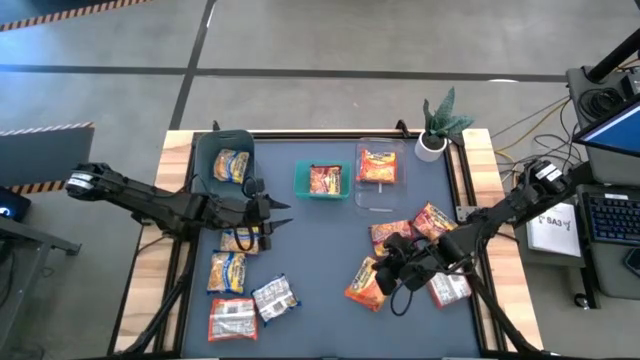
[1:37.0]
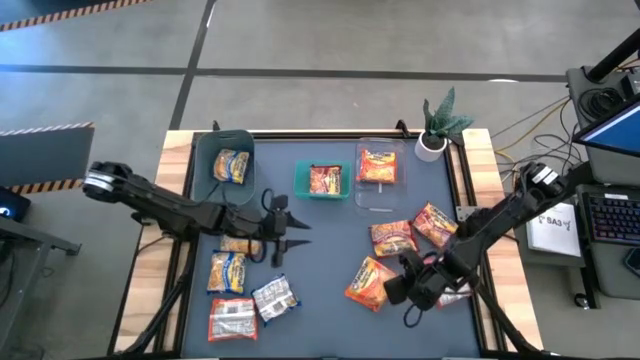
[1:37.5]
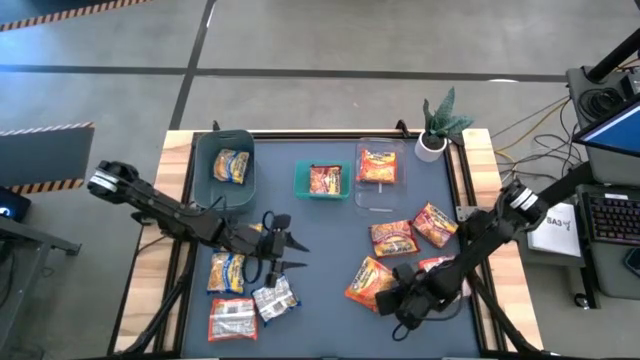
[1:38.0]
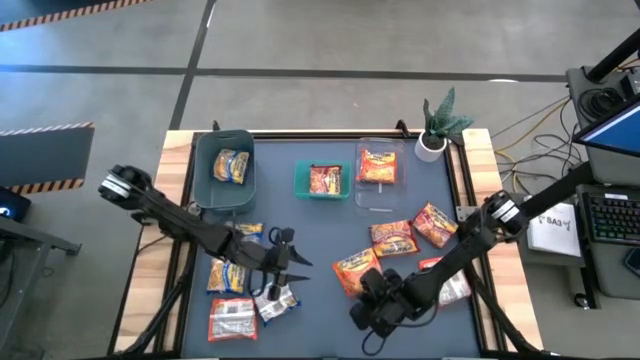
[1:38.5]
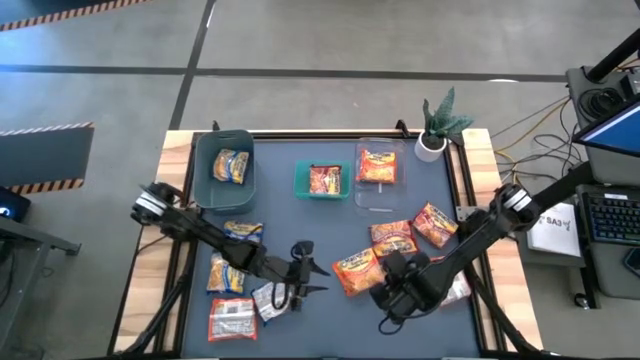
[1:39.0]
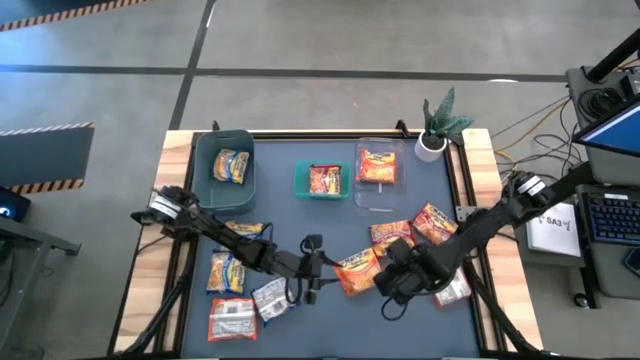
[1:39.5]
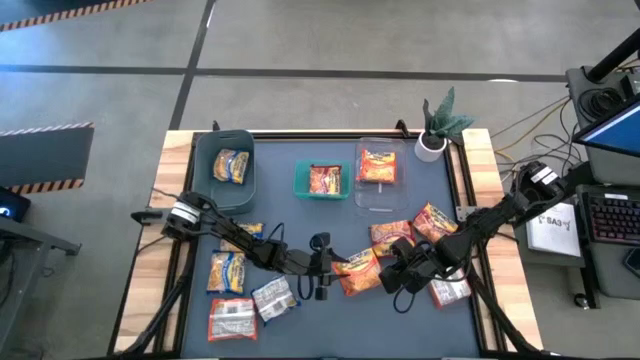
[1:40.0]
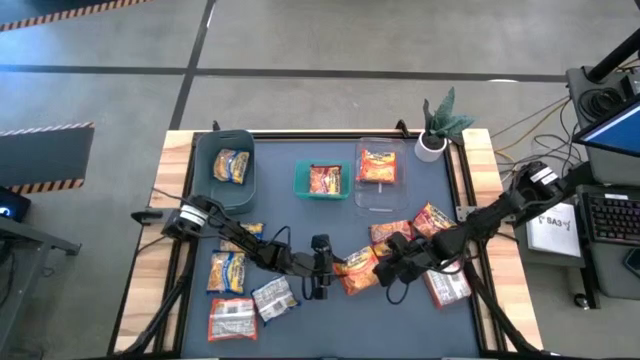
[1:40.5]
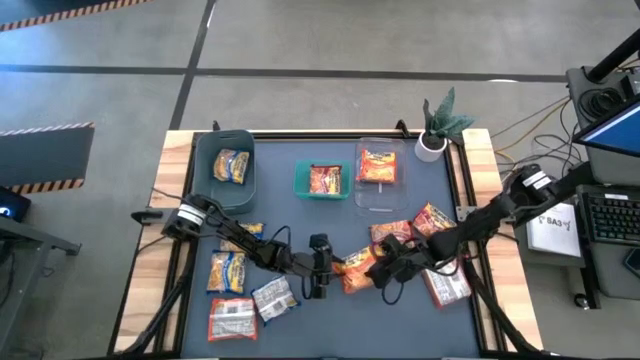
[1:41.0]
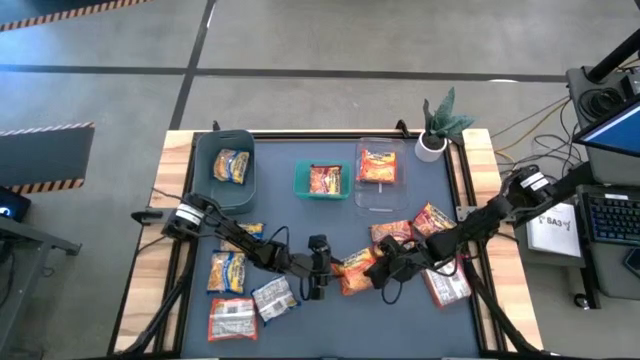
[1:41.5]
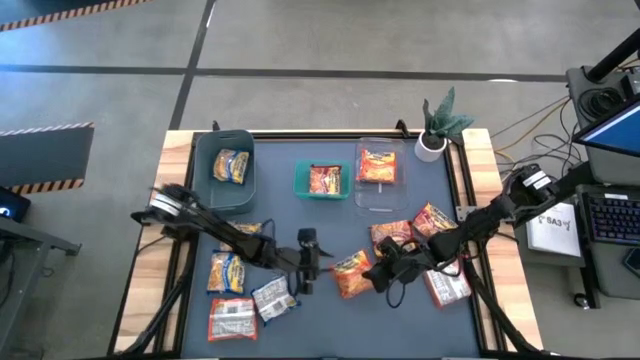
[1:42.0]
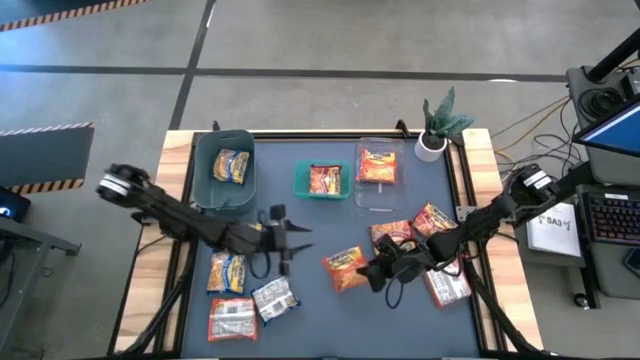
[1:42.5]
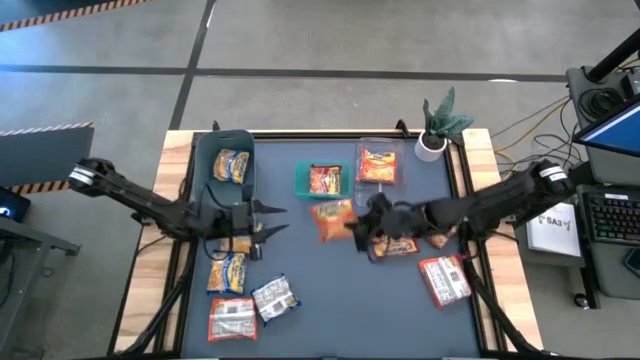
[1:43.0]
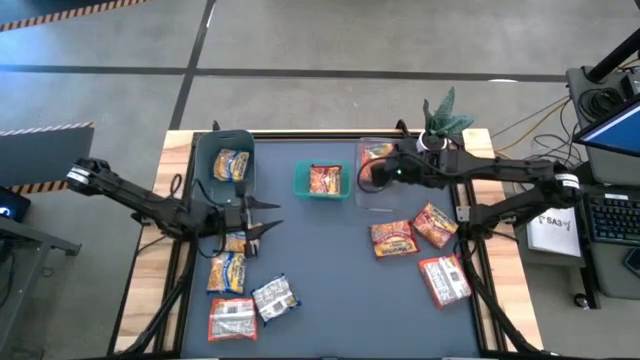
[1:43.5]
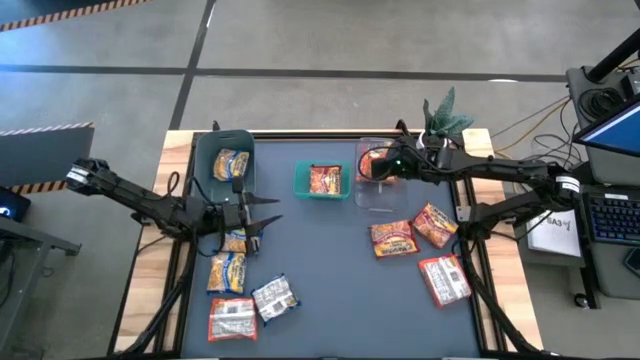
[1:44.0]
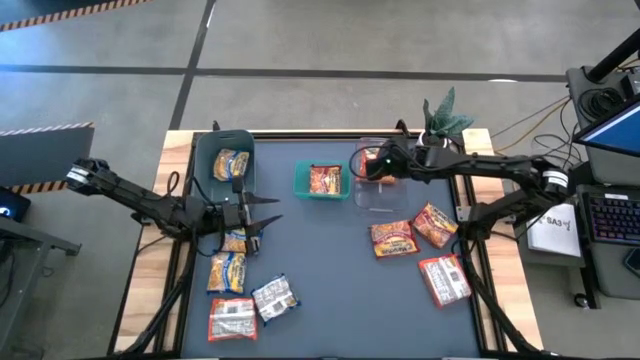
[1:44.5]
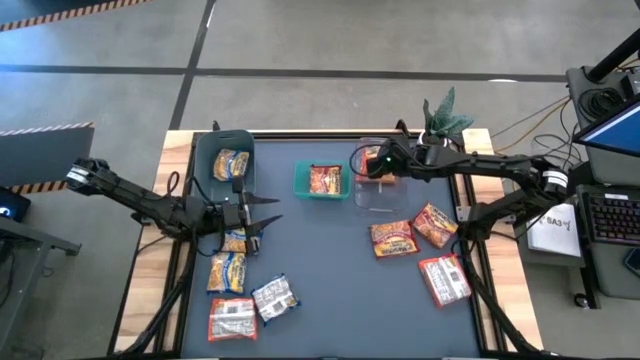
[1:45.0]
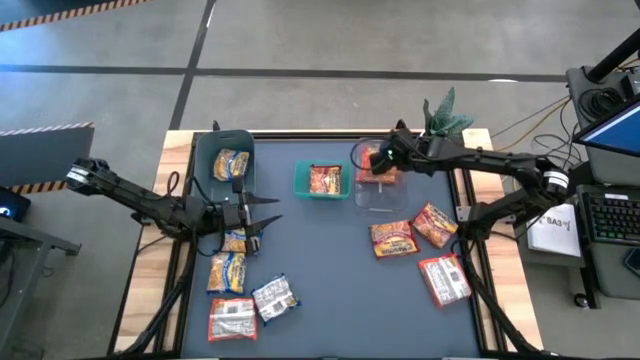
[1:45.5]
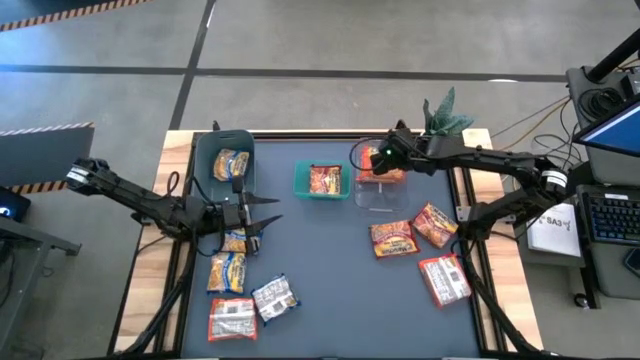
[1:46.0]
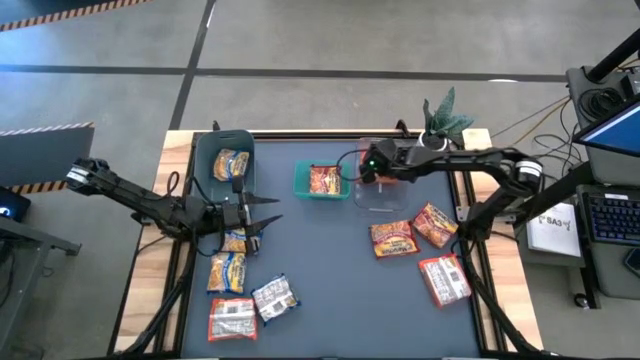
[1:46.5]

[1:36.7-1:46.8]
Task: Sort Maruchan noodles
Put the orange noodle pack into the transparent bin

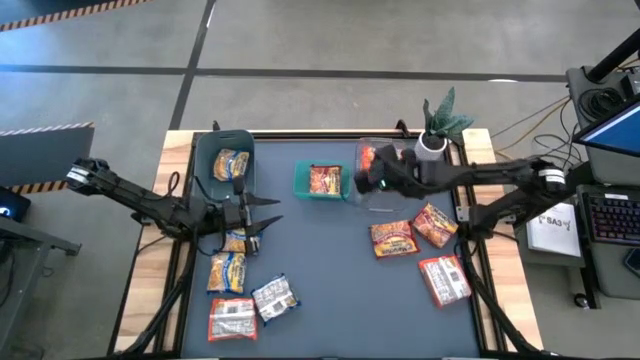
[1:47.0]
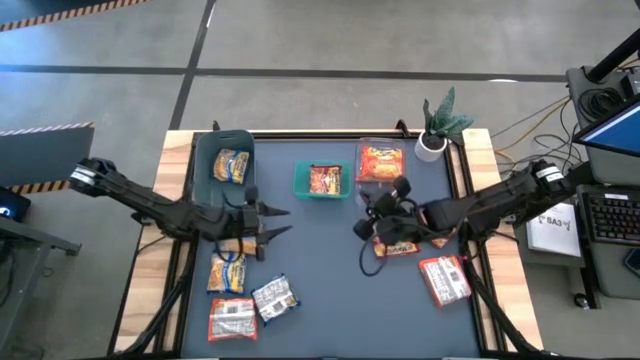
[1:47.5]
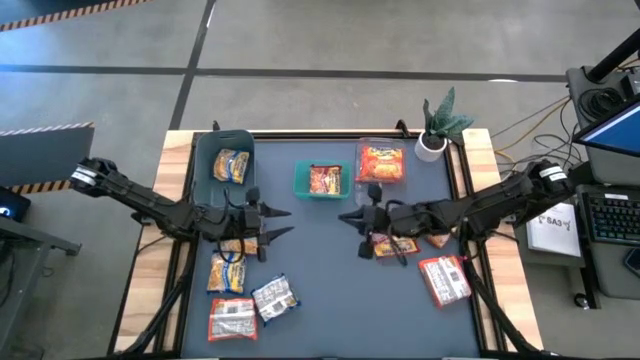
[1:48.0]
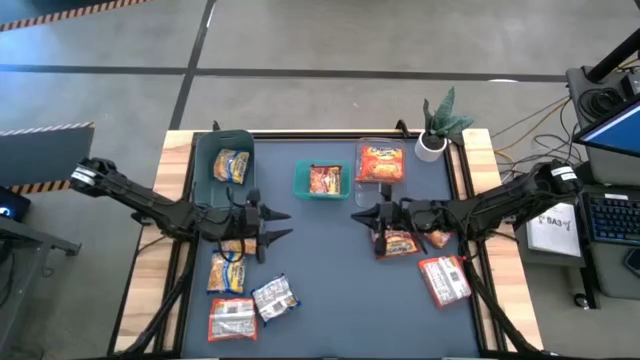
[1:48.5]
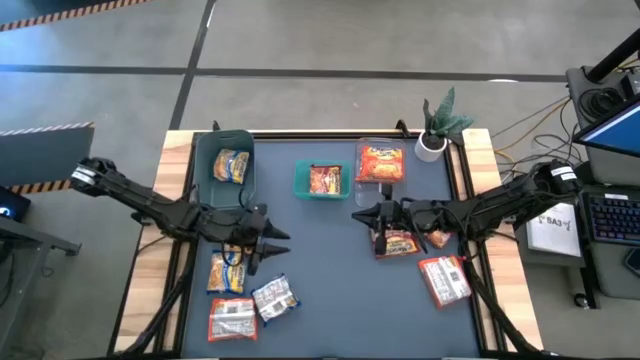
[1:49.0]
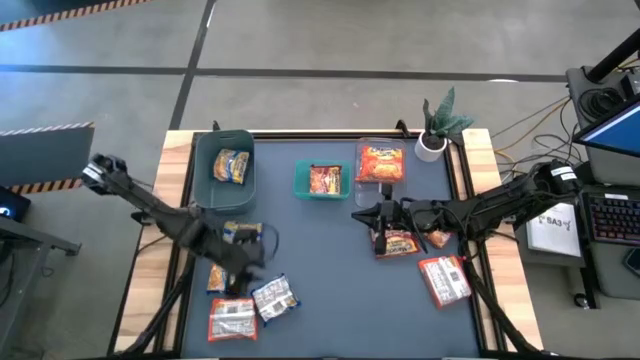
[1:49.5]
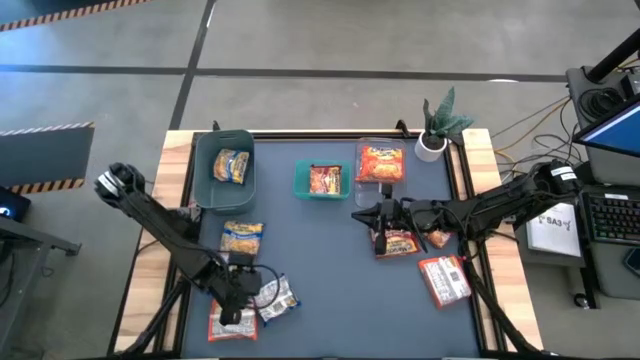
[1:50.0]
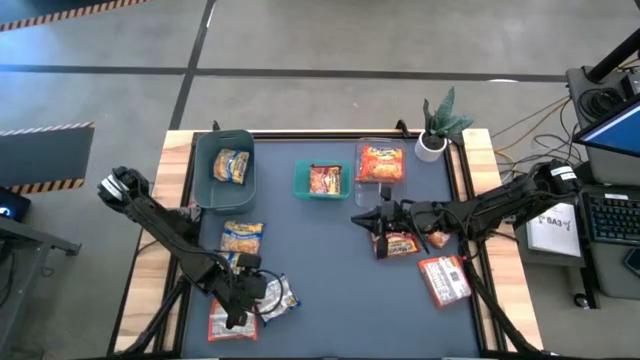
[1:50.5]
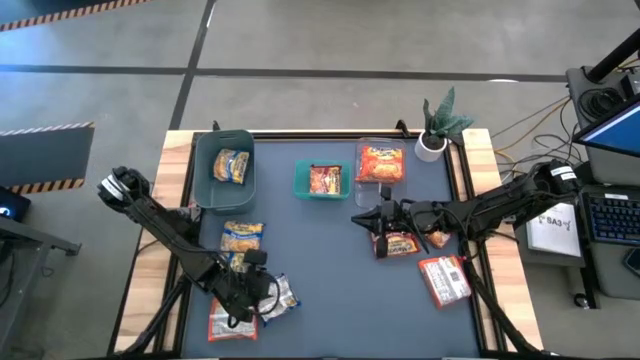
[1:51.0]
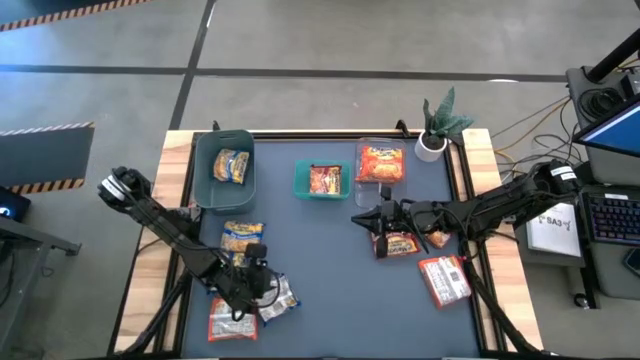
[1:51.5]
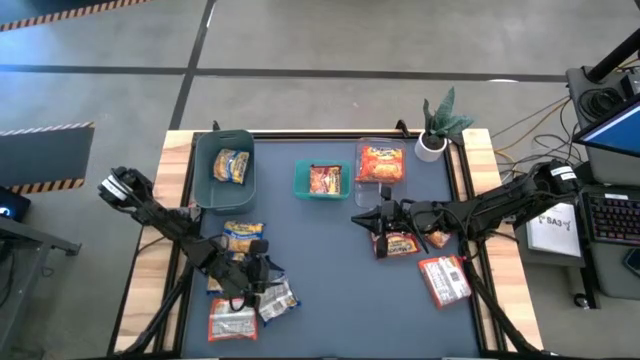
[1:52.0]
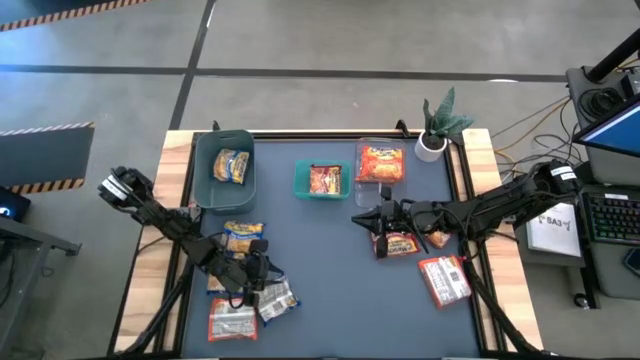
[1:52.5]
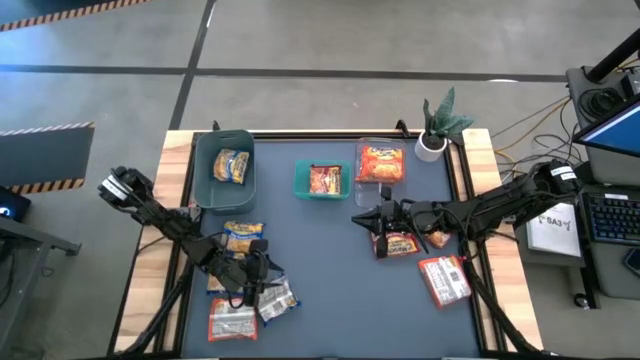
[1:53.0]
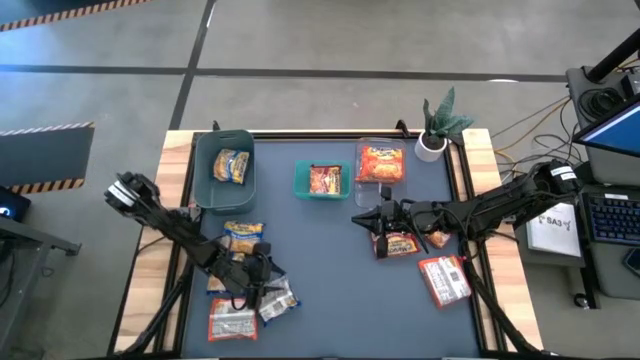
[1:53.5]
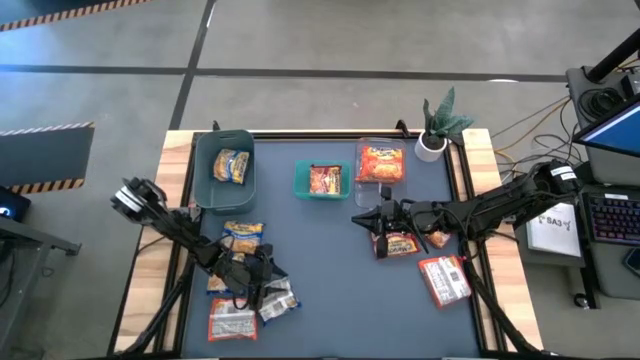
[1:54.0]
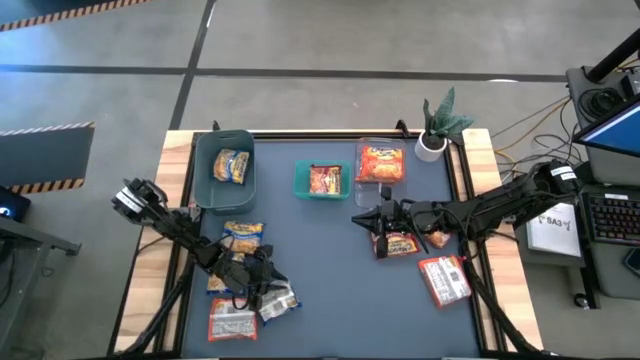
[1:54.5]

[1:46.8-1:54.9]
Put the blue noodle pack into the dark blue bin

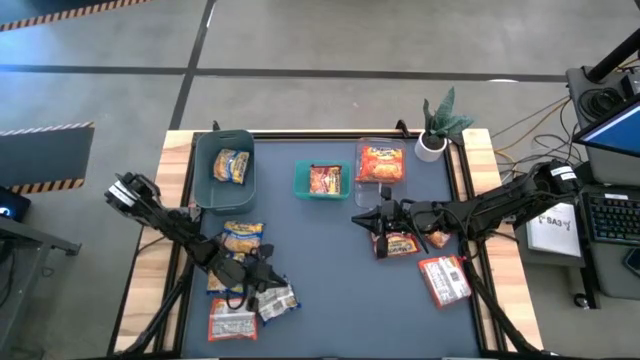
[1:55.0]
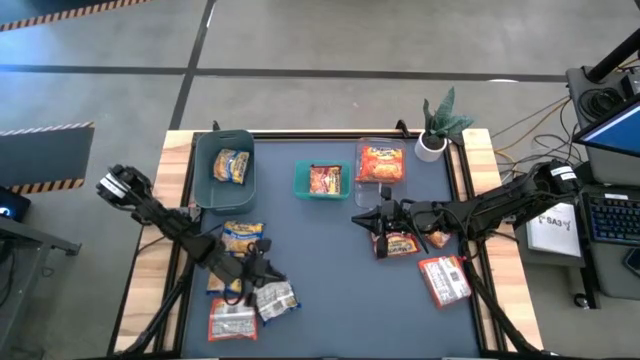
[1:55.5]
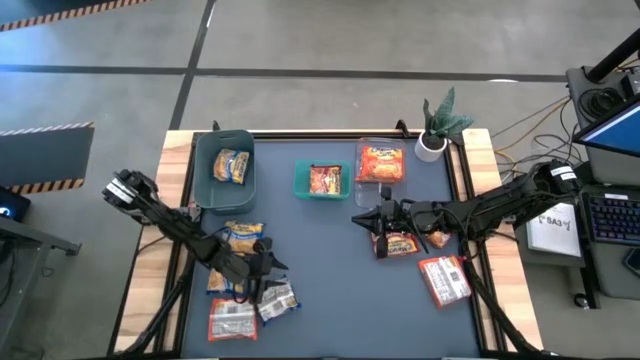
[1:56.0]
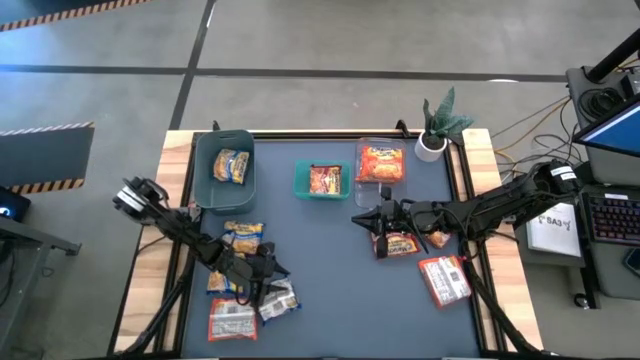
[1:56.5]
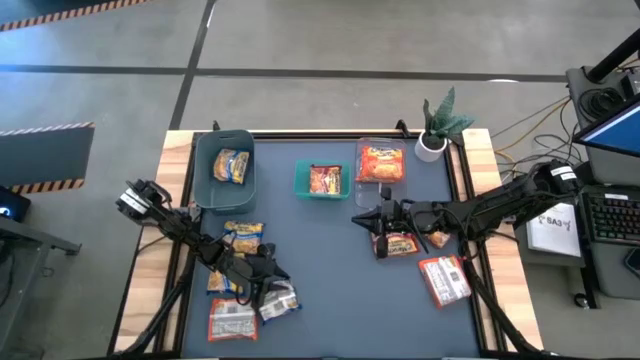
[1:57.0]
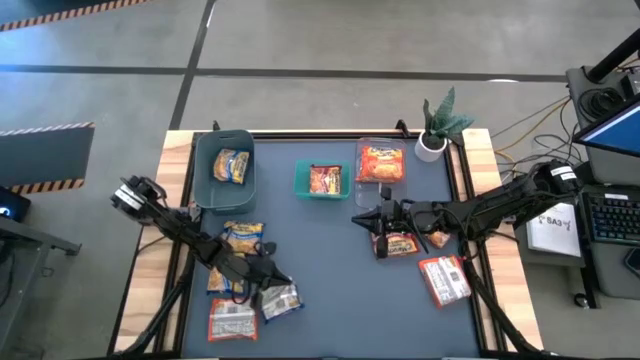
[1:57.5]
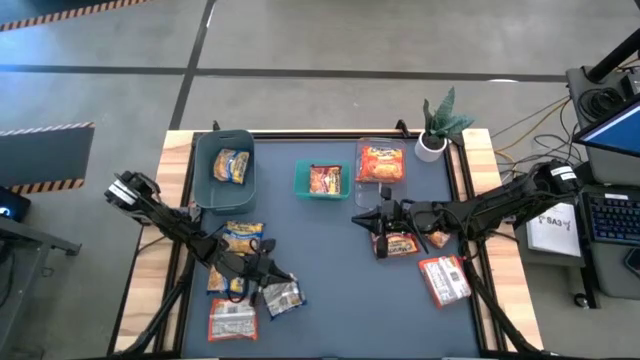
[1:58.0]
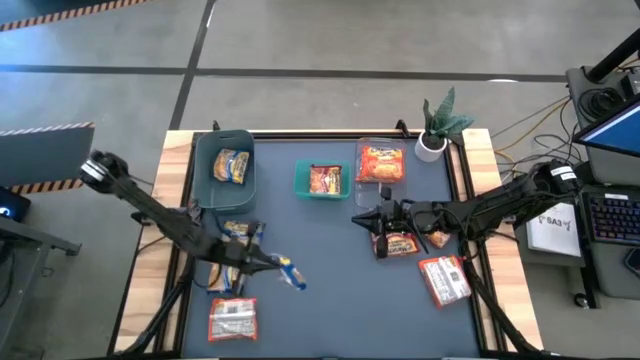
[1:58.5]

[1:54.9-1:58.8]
Put the blue noodle pack into the dark blue bin
